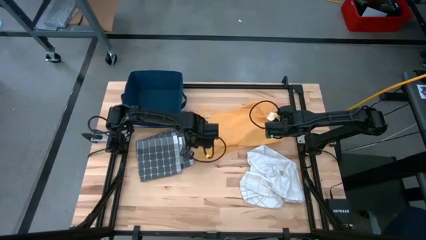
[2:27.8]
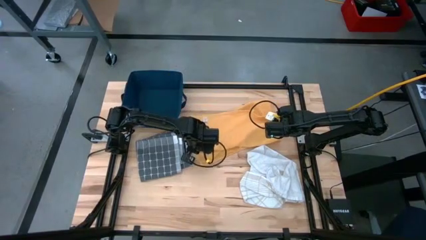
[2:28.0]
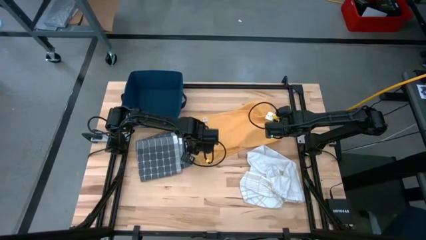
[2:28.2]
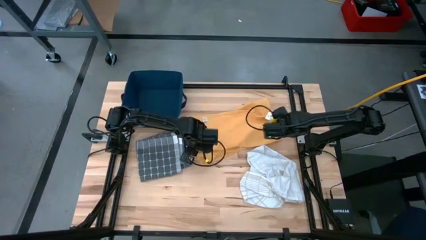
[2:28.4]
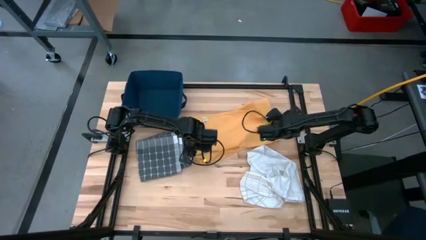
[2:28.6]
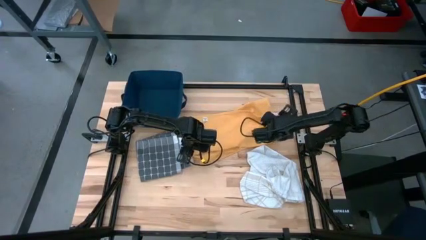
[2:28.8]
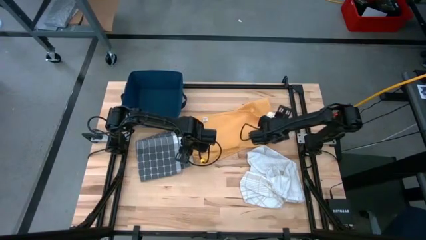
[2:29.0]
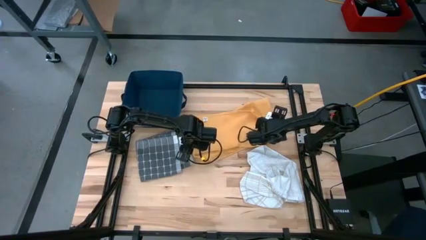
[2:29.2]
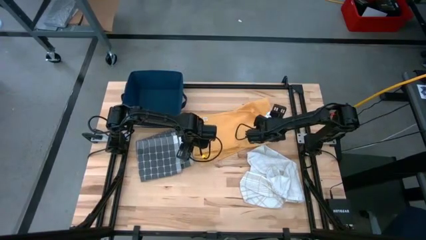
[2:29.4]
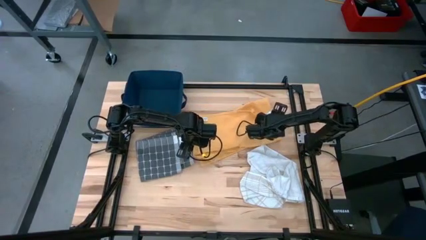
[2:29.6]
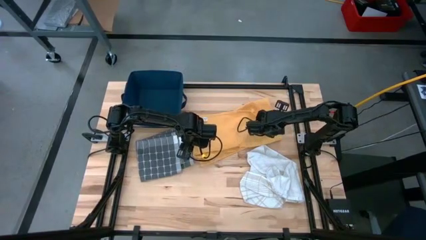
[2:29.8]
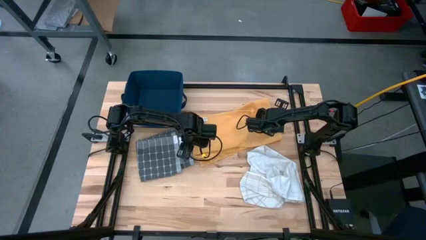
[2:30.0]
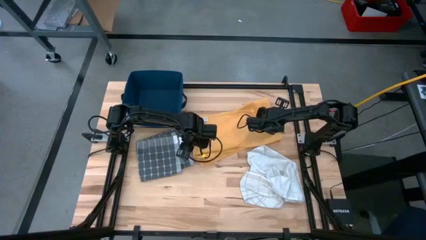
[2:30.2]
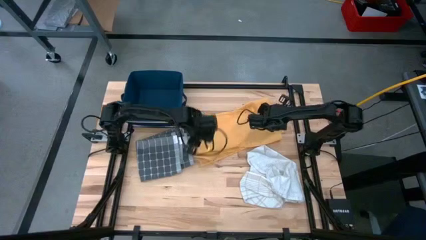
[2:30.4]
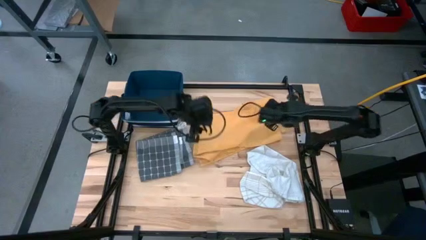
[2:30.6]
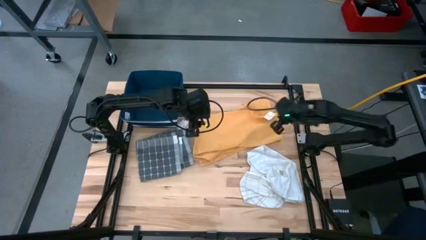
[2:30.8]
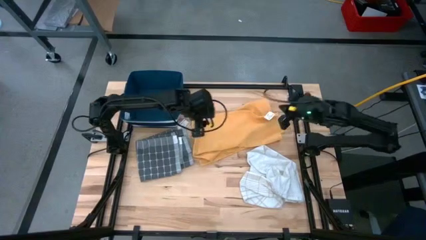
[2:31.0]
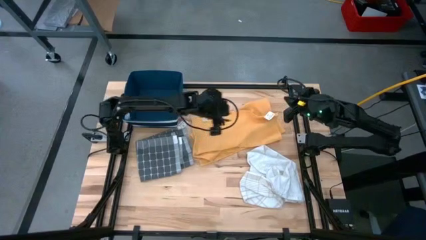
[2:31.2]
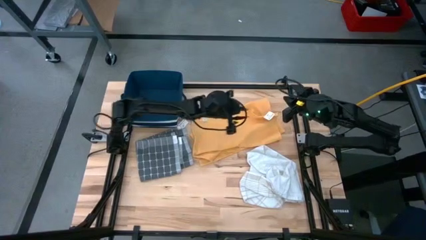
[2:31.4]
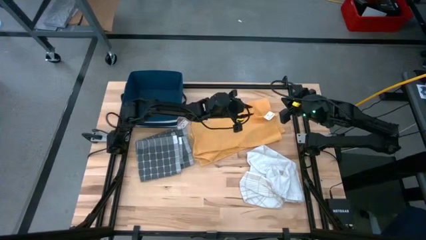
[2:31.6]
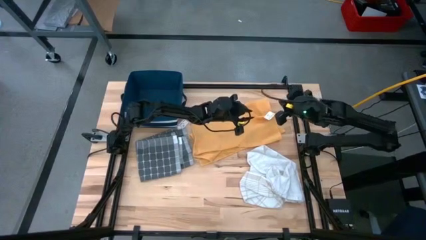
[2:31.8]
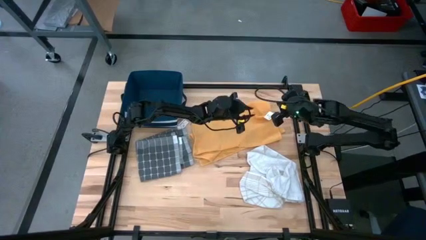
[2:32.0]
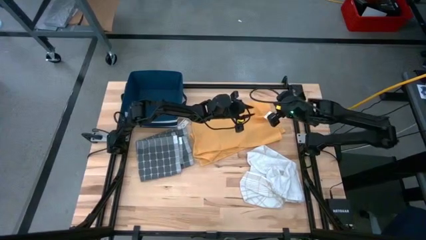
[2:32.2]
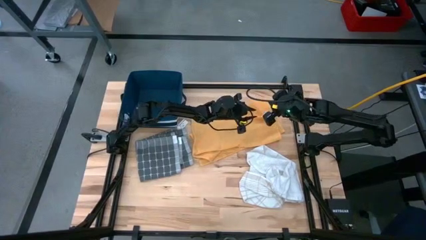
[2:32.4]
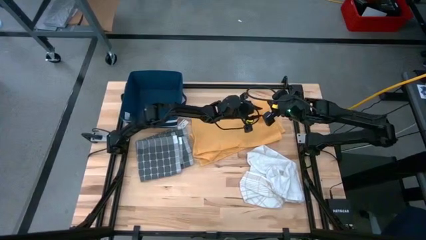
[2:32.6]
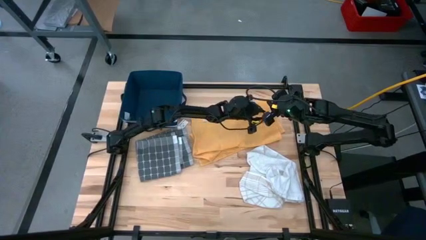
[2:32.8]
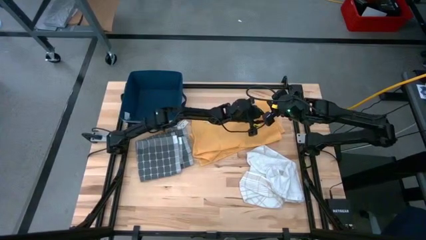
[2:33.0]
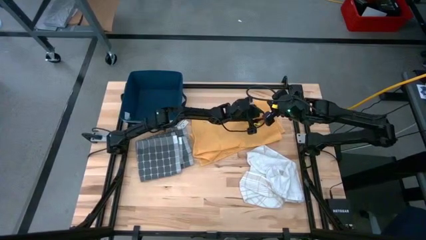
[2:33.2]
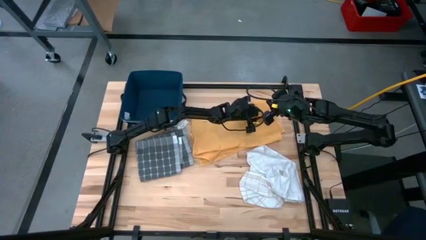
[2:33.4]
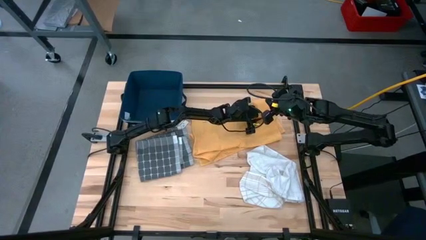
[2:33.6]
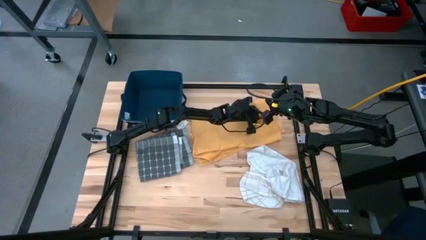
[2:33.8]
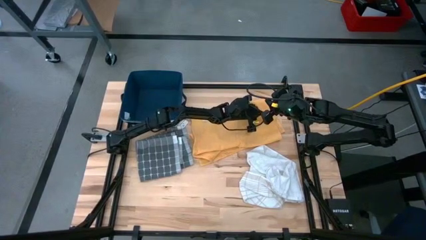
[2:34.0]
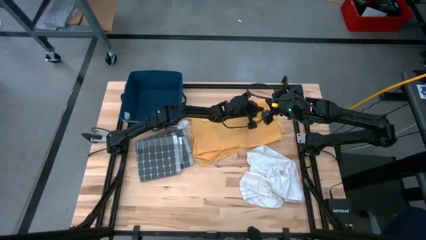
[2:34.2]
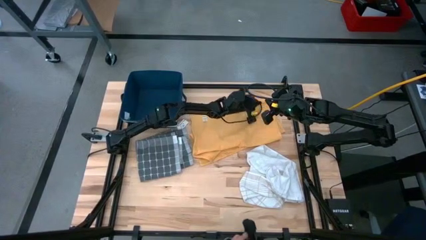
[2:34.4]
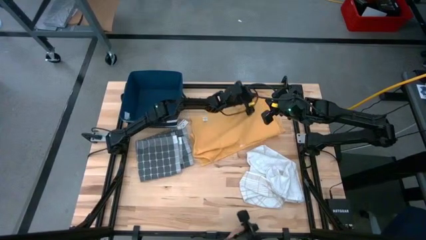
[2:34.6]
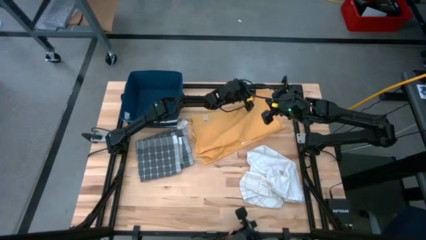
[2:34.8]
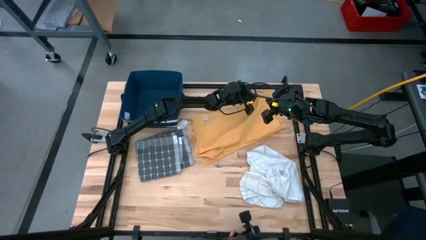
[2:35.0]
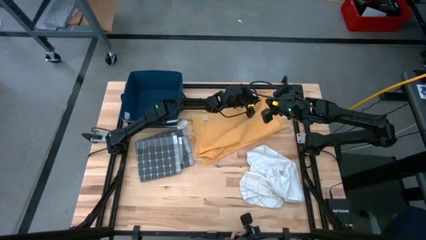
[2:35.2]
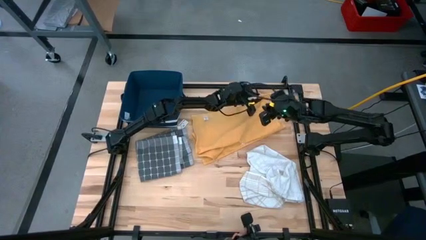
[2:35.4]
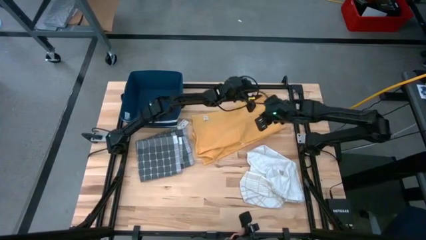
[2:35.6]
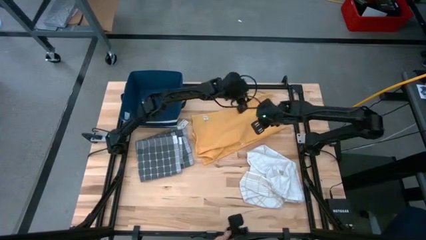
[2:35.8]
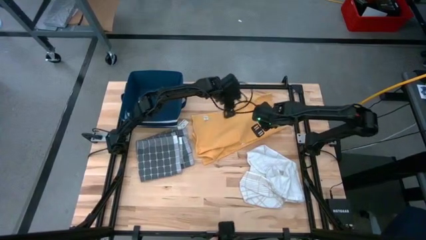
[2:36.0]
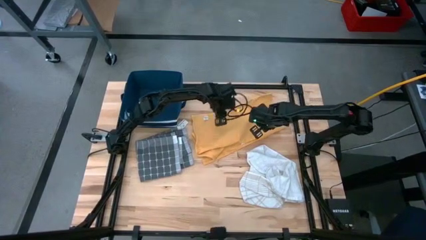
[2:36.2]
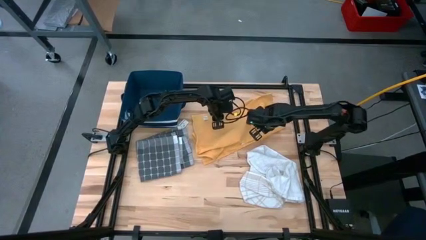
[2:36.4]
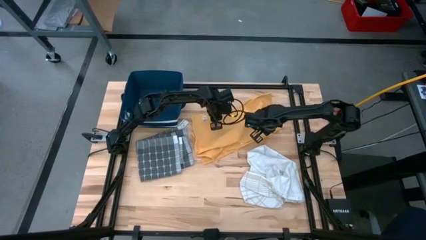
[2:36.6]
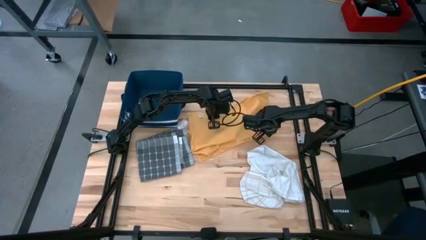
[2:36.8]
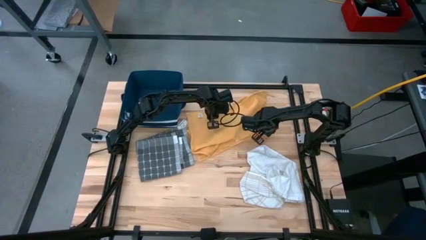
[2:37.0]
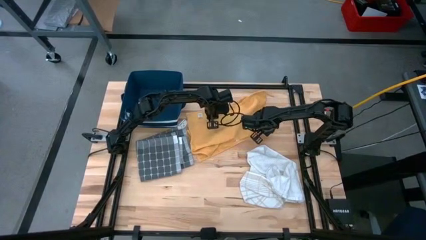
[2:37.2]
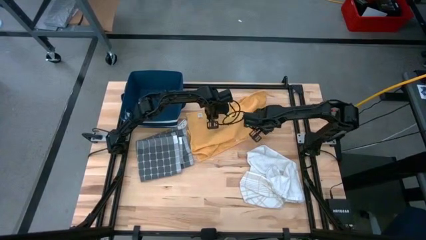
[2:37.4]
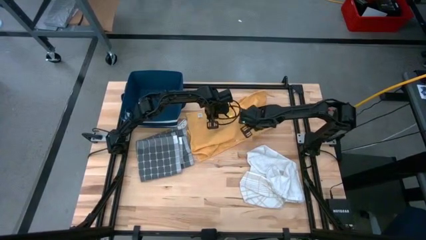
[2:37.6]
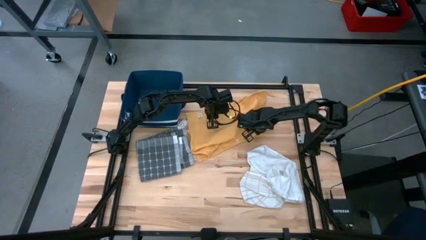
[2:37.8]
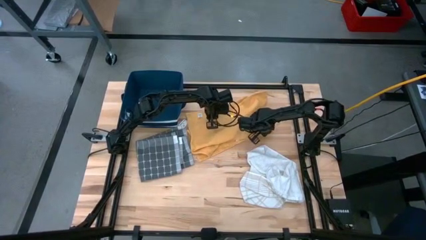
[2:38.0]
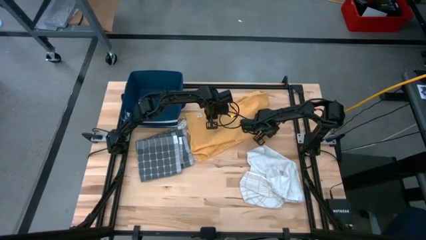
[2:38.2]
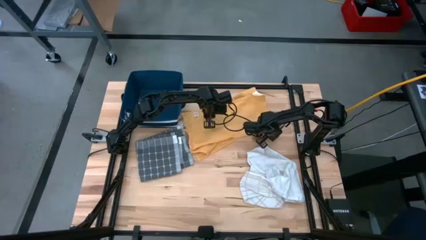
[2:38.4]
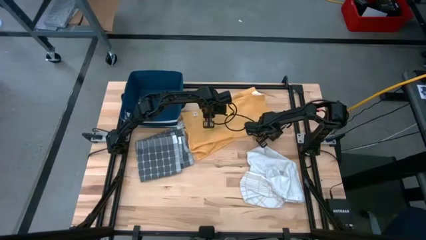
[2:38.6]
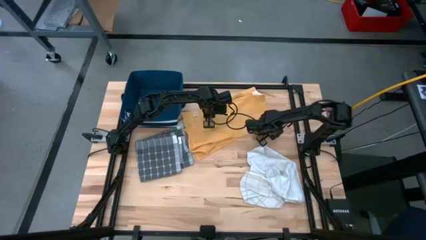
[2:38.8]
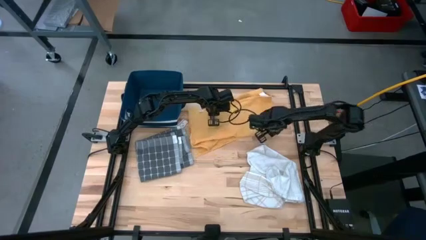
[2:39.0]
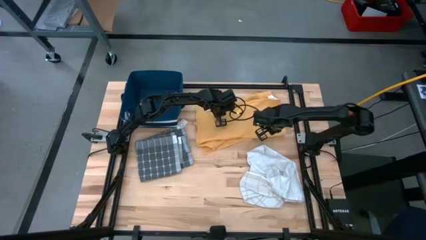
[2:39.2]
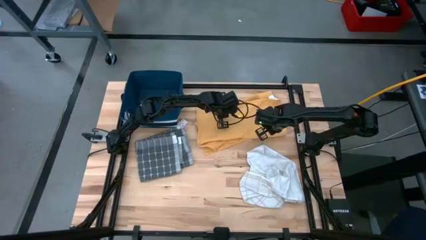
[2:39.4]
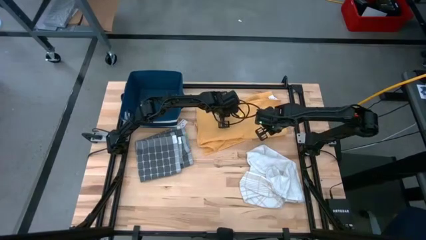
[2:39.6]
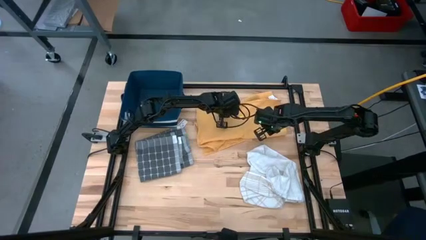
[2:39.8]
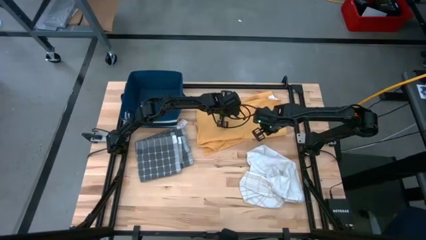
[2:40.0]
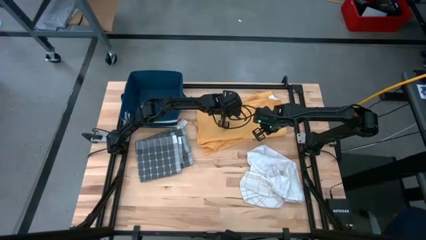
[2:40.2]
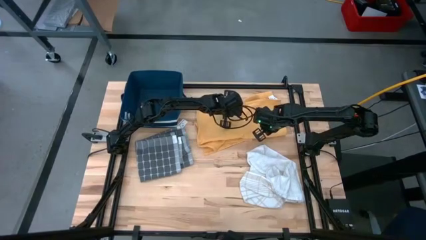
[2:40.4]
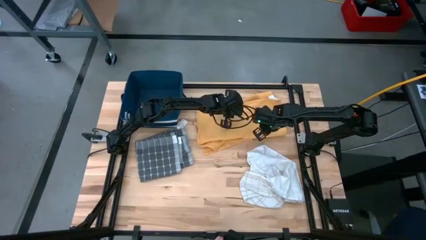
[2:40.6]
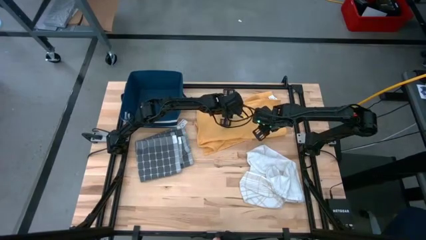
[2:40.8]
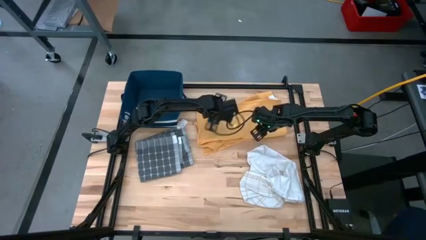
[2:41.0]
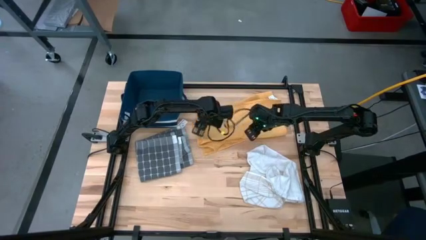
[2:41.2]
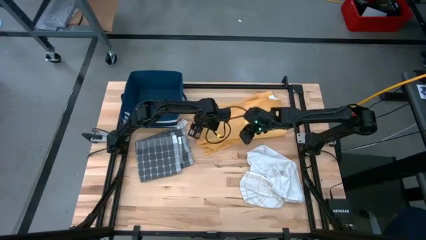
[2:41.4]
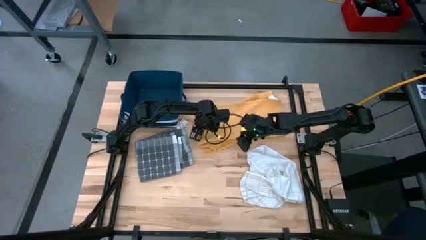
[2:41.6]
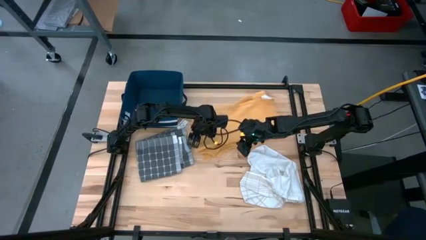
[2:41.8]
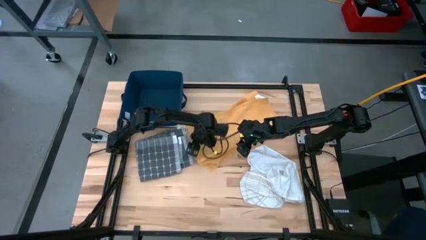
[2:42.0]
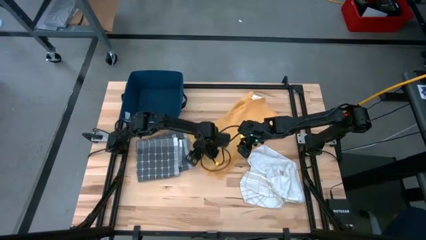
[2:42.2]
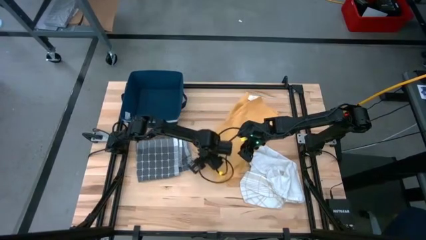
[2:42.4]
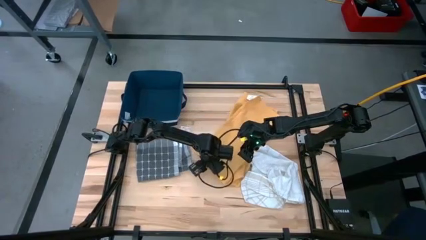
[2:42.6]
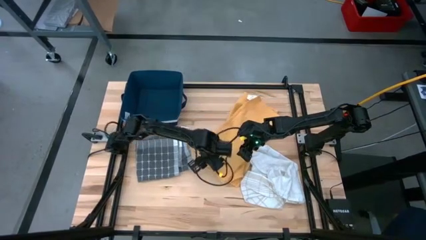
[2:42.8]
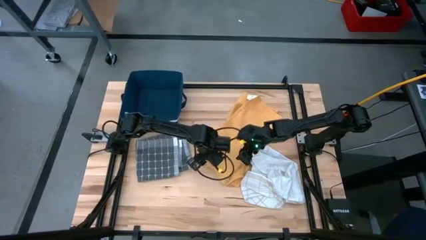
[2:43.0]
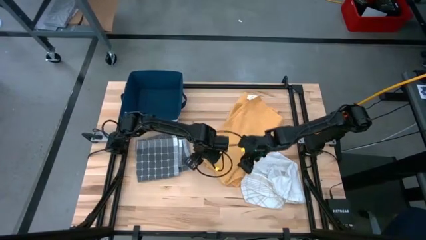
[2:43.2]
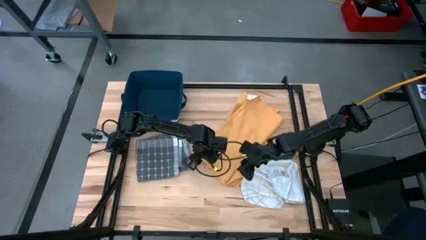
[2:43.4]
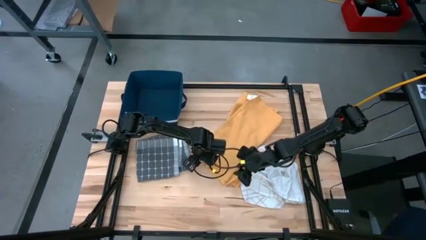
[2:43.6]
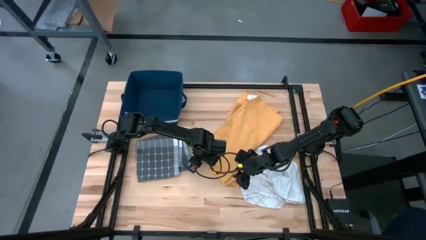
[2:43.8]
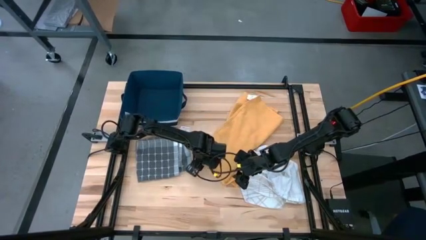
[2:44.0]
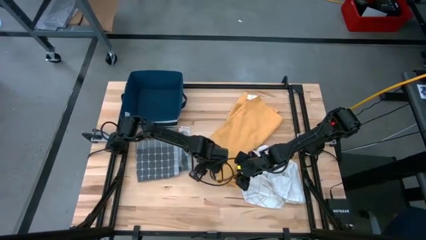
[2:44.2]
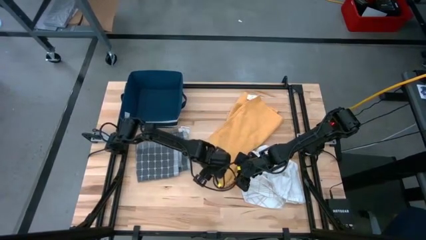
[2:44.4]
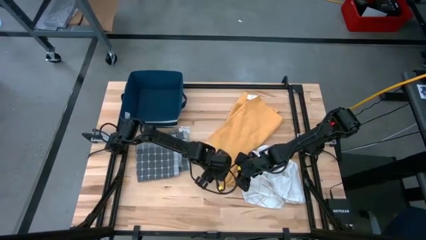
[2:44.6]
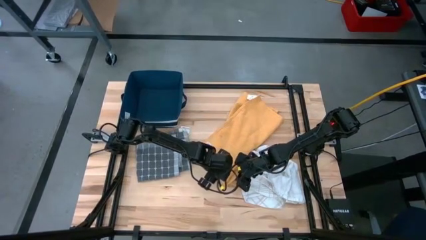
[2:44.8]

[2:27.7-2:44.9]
Task: Fold towel
Fold the yellow towel
